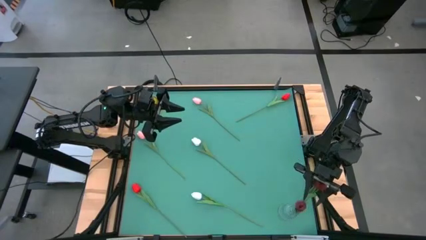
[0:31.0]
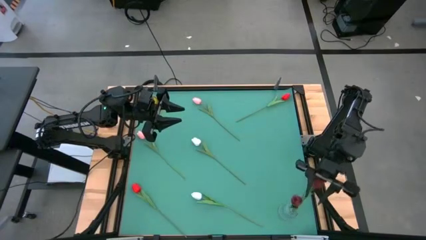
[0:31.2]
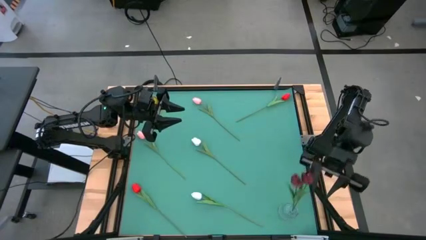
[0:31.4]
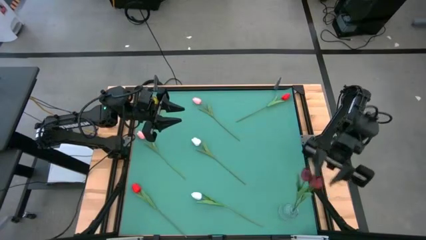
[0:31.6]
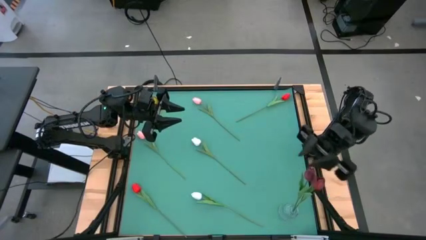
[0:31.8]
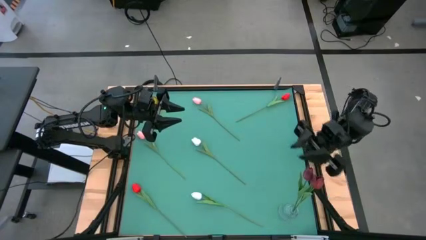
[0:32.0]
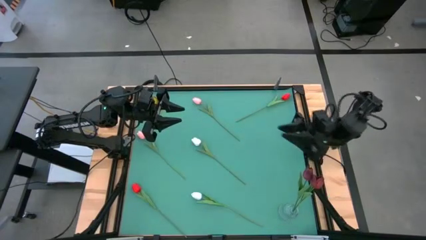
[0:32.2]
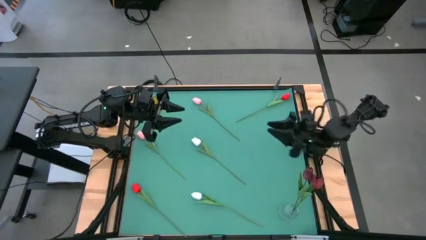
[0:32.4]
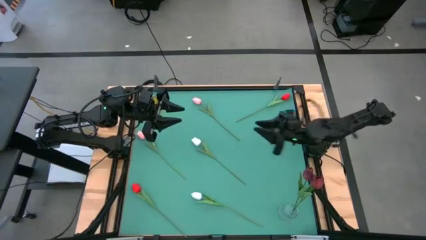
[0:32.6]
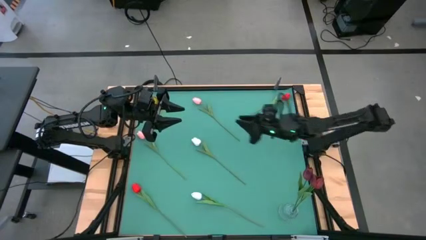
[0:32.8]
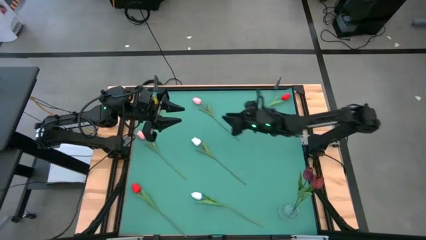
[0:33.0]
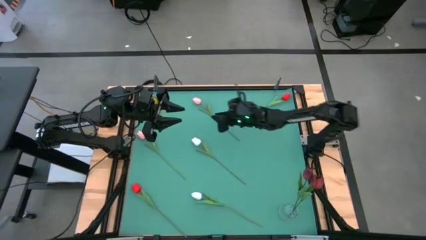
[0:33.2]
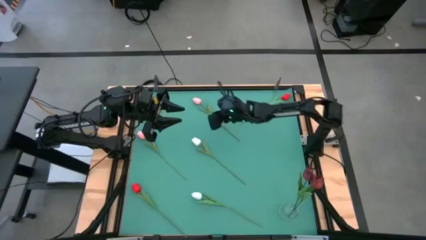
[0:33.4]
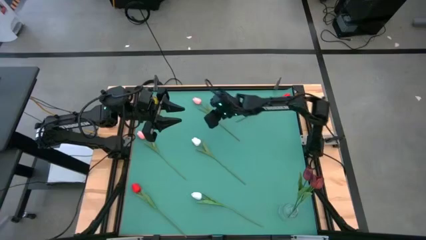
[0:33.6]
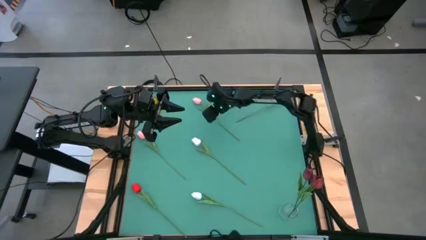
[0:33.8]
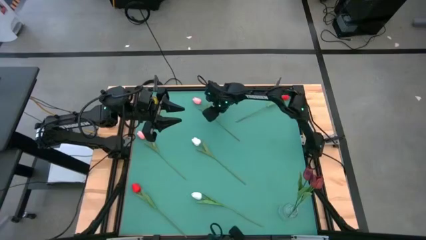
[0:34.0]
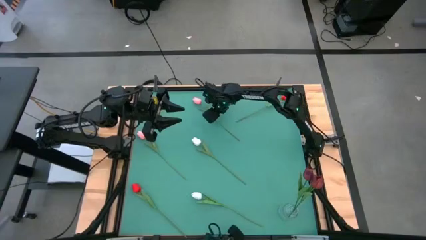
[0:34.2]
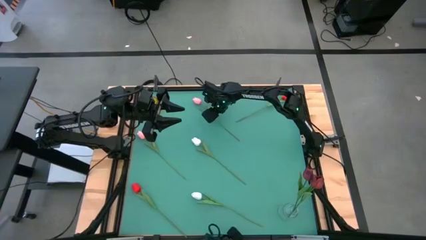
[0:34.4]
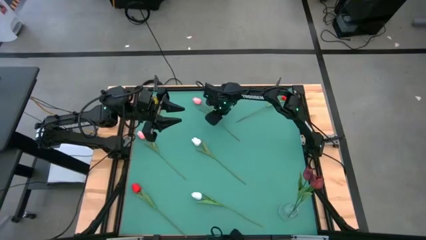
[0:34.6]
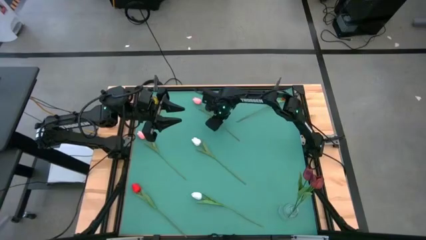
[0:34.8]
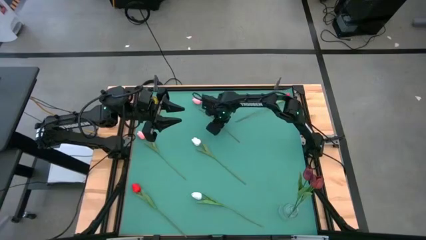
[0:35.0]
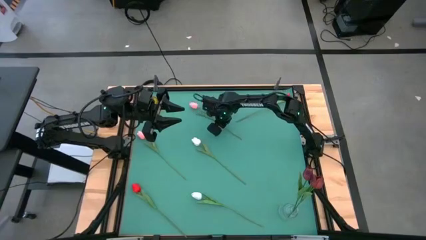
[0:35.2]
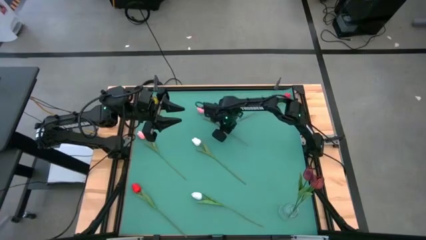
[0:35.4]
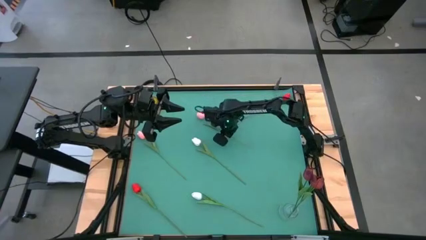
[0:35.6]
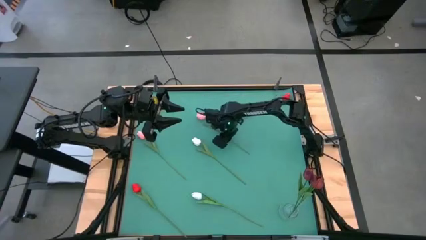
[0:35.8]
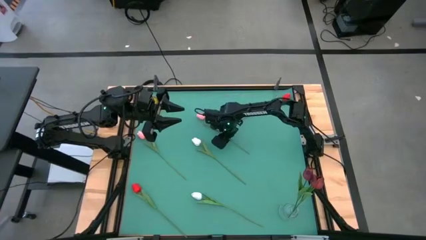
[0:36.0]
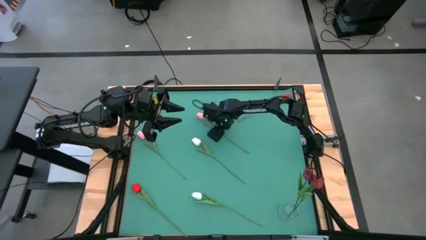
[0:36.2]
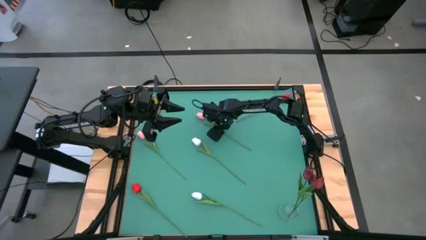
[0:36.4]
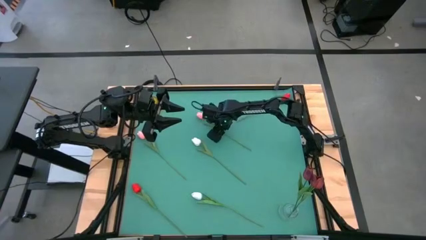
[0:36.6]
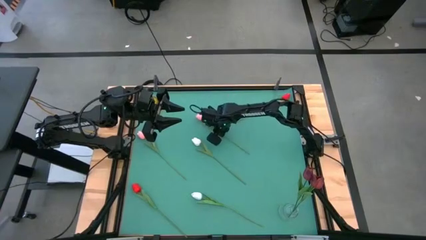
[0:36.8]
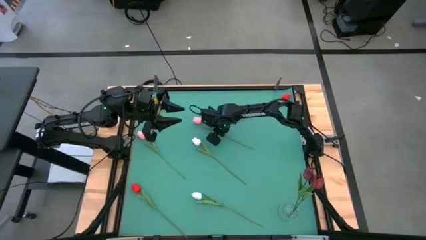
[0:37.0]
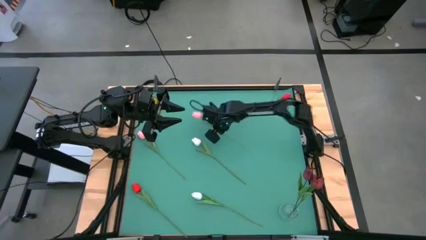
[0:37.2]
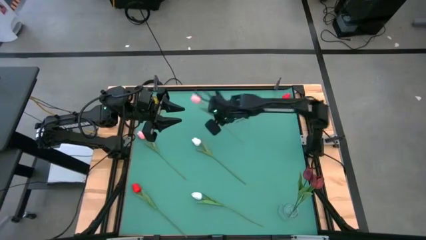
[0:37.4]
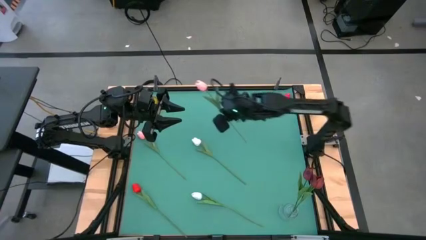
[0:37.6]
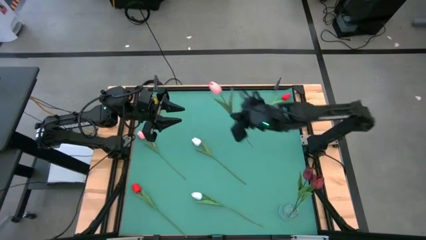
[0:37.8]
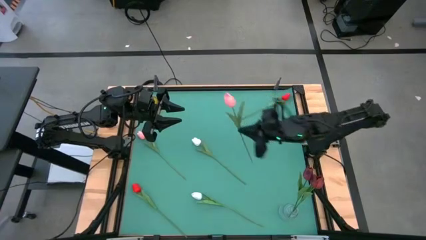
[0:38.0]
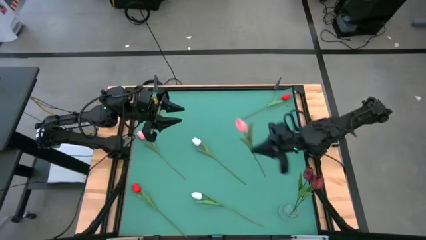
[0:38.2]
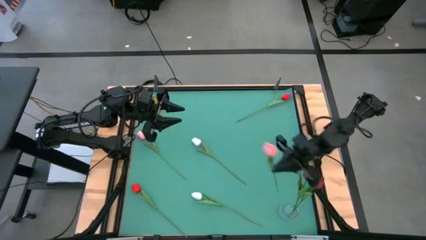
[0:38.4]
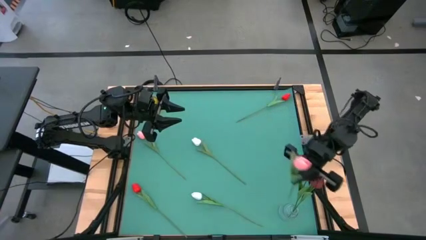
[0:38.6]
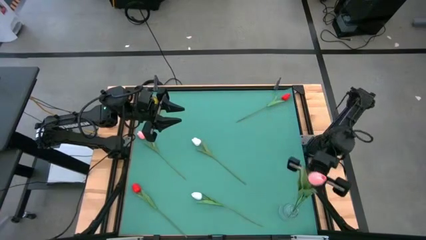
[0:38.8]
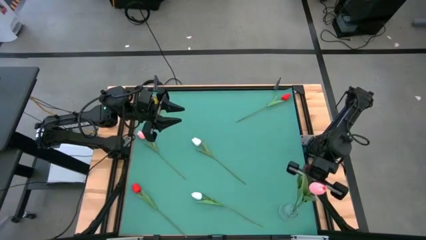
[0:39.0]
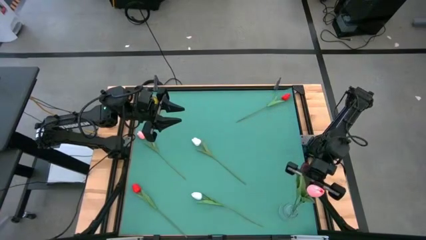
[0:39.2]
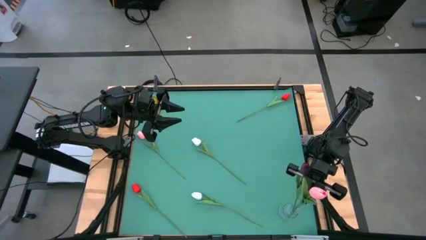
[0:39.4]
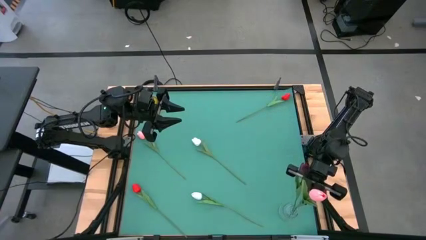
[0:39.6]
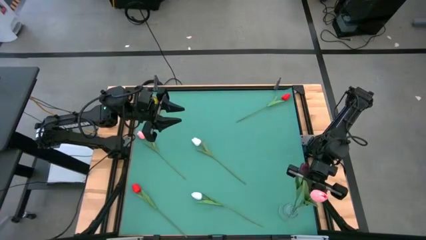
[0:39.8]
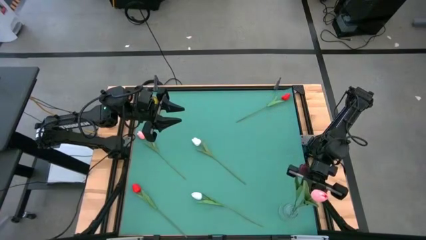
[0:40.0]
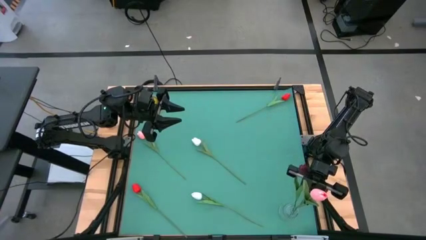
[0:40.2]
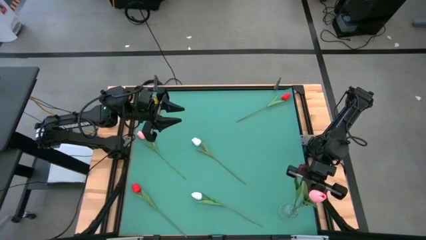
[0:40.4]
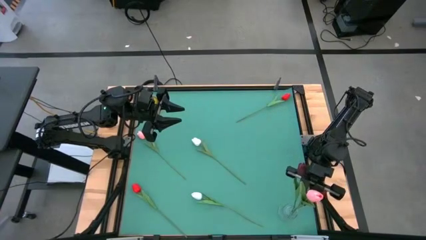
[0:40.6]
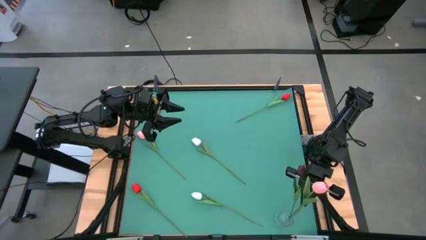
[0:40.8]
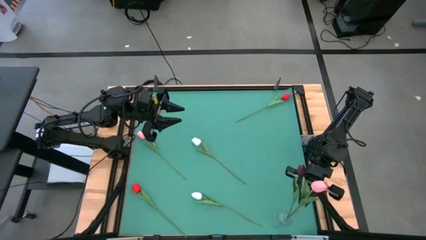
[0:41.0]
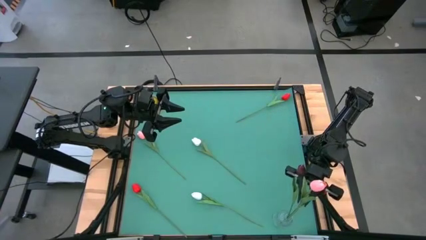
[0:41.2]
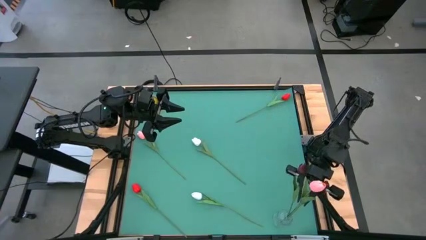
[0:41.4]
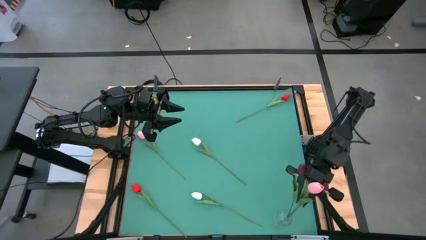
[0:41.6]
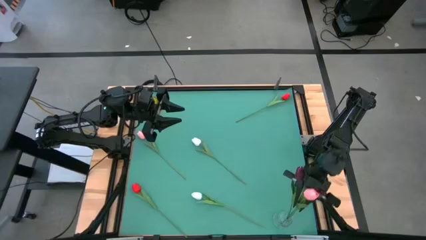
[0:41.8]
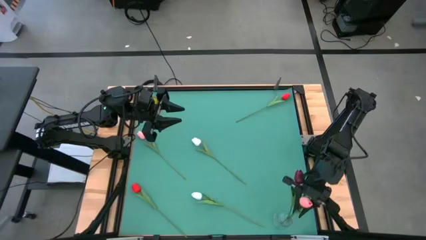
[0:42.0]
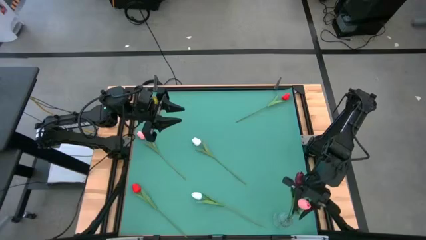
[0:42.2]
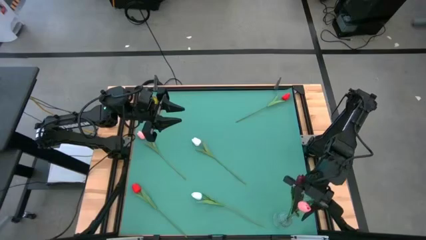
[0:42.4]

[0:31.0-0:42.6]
Task: Sort flowers into vase by color
Put the top pink tulip into the transparent vase

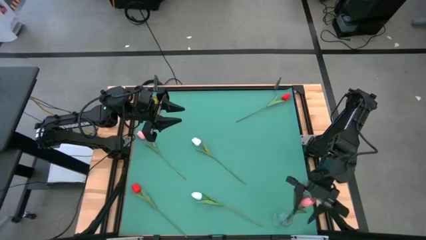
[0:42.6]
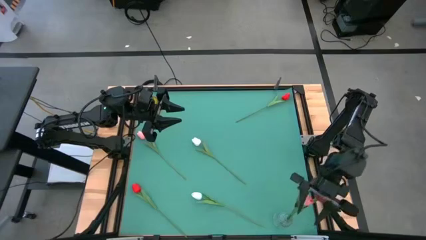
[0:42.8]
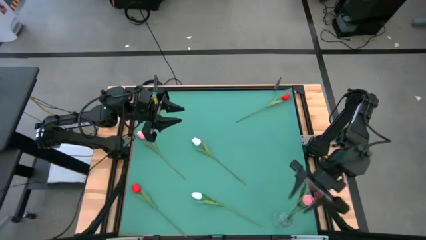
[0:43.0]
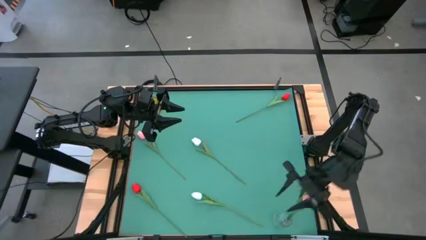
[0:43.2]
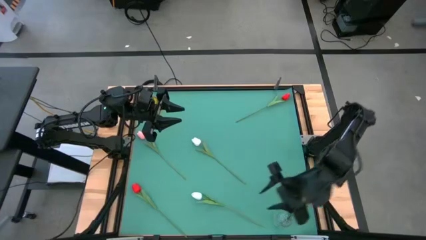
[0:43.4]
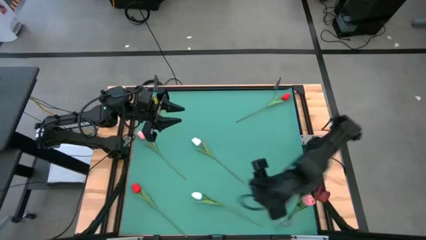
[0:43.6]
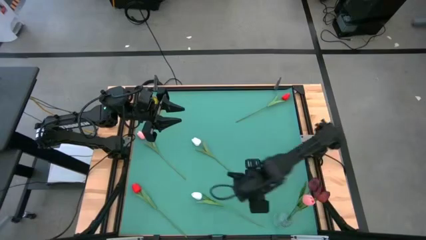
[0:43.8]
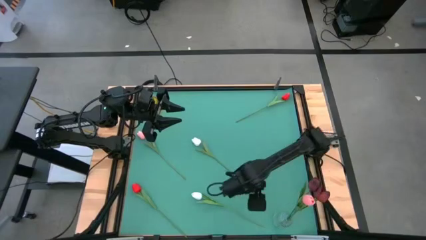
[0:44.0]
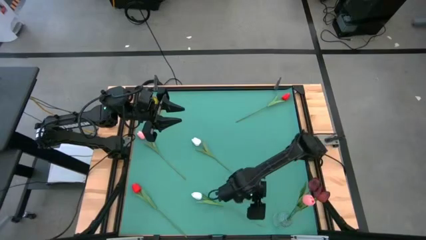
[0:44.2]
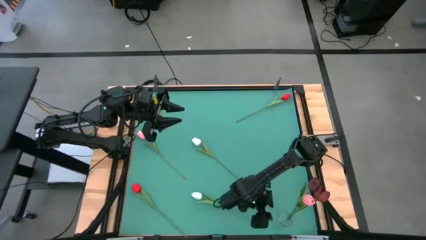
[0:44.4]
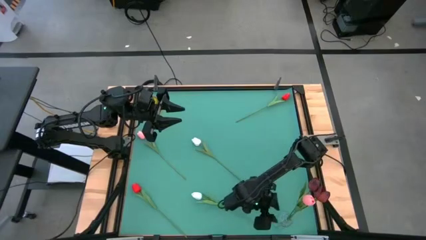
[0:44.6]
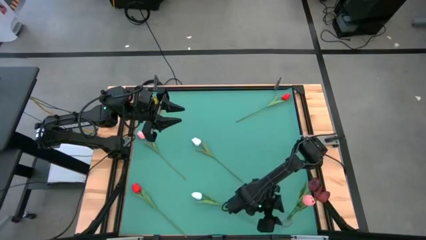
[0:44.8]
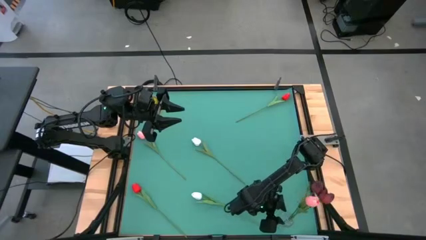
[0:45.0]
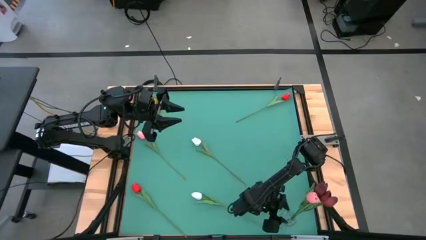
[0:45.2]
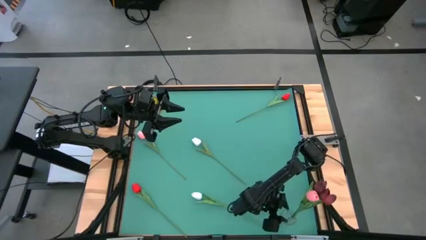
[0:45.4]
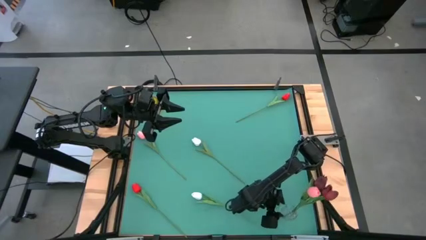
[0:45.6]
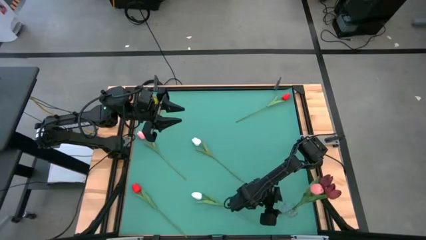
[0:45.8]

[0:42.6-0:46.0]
Adjust the transparent vase
